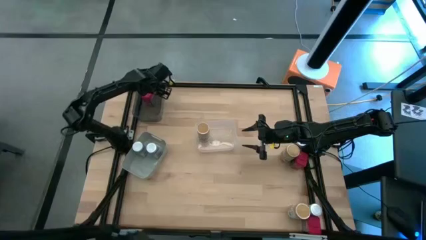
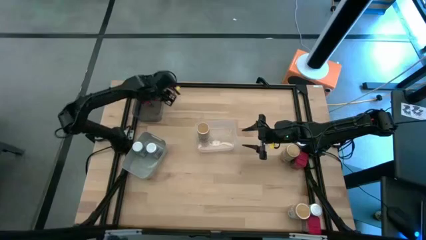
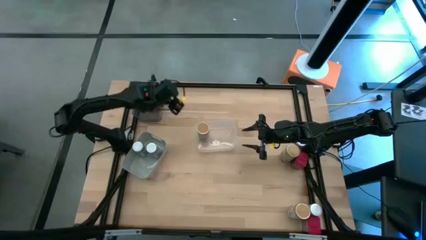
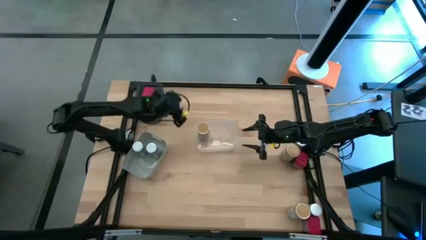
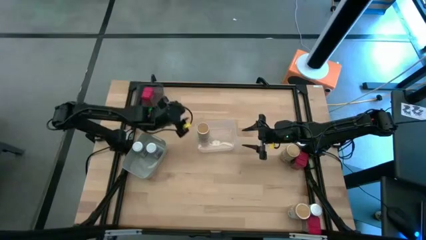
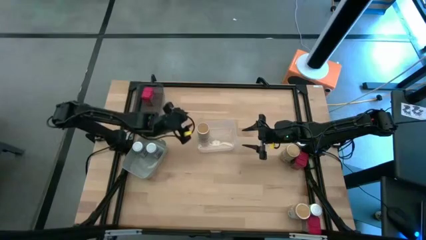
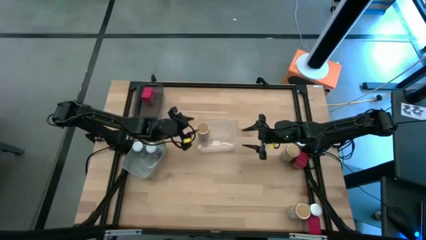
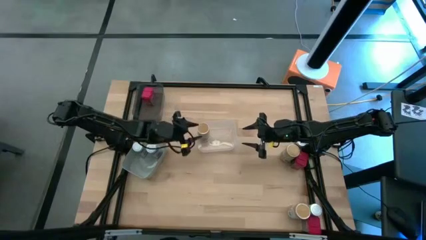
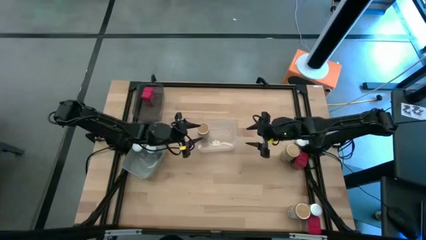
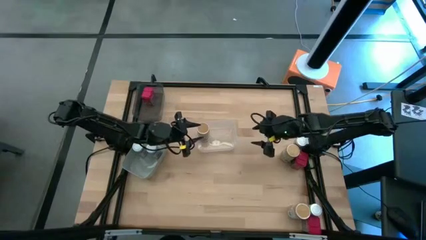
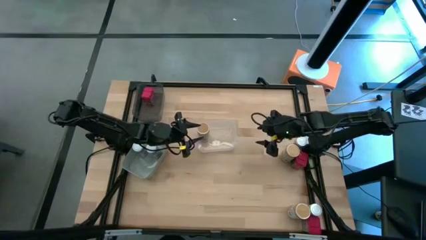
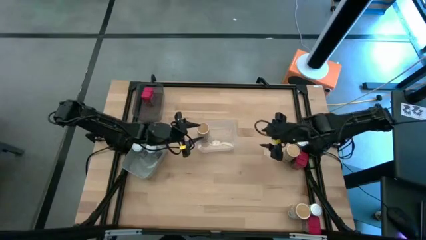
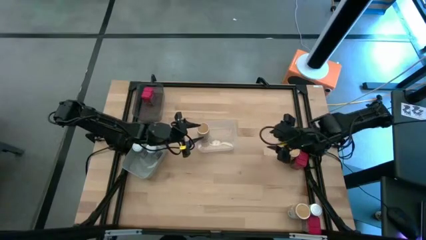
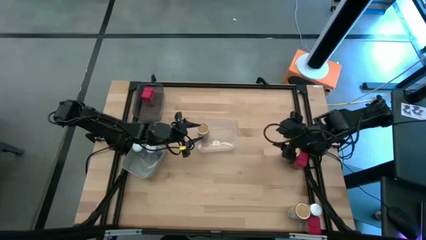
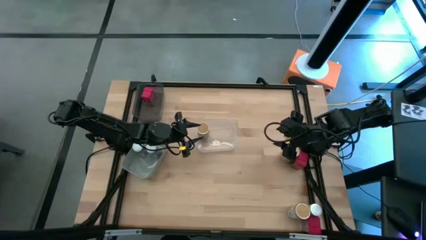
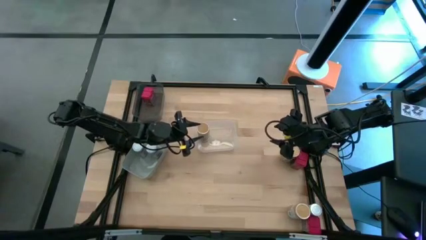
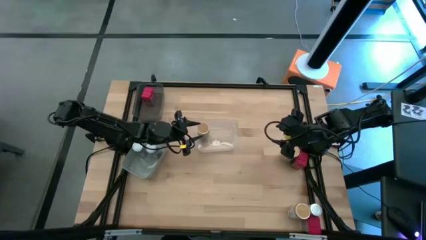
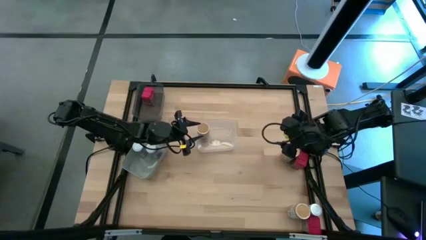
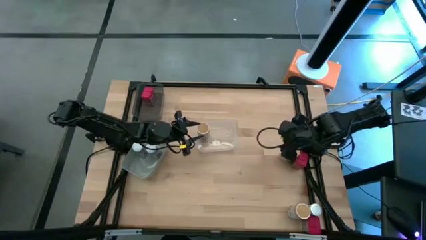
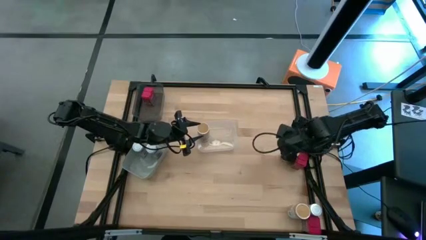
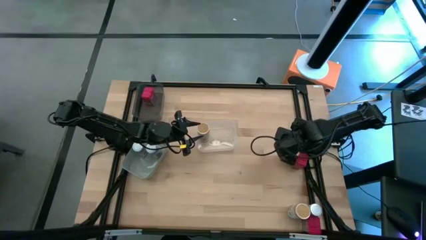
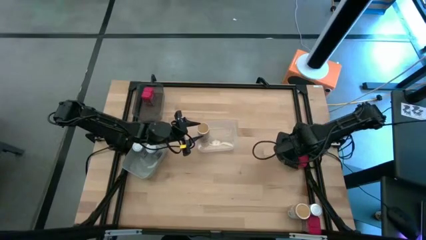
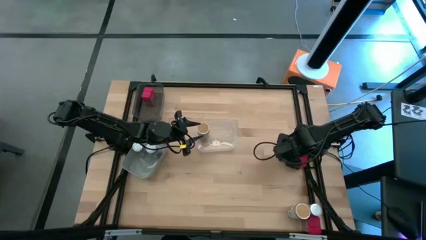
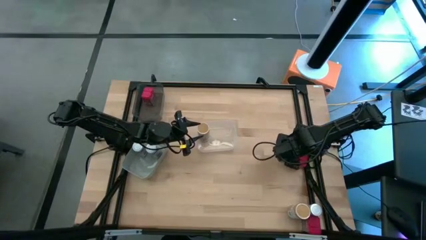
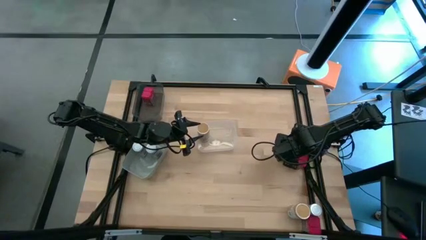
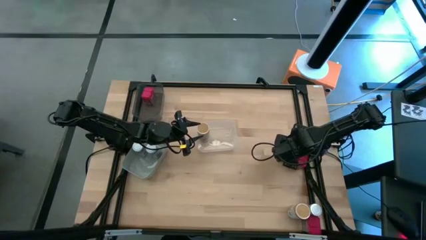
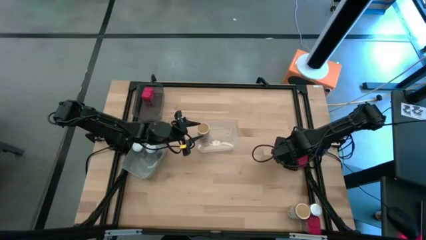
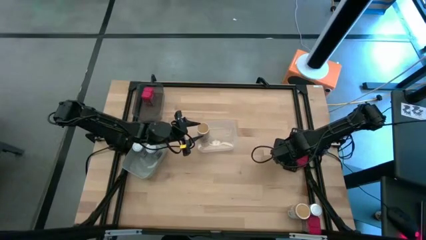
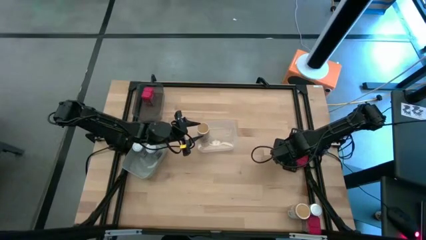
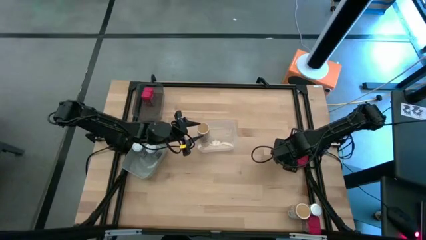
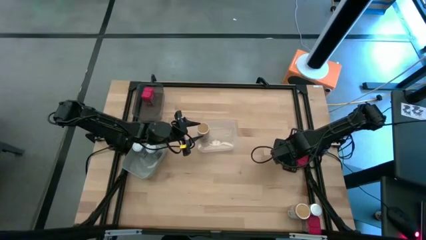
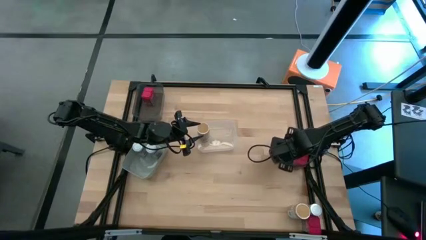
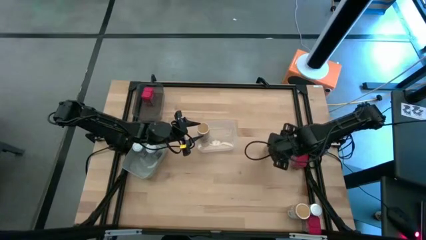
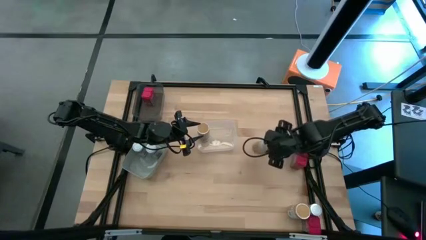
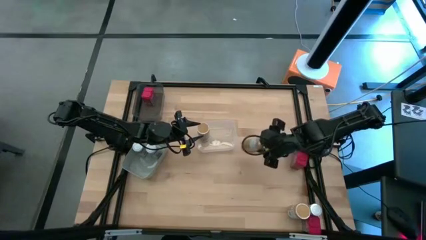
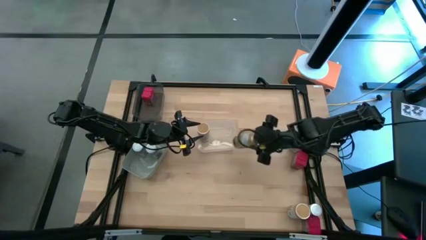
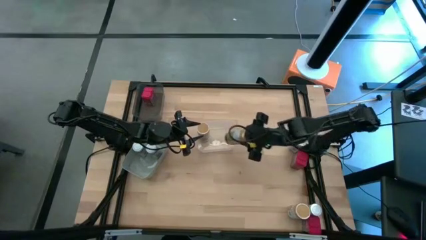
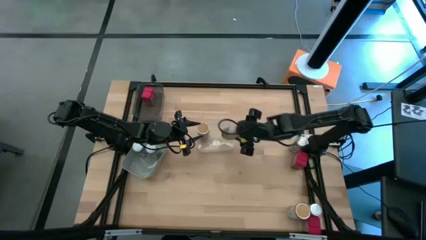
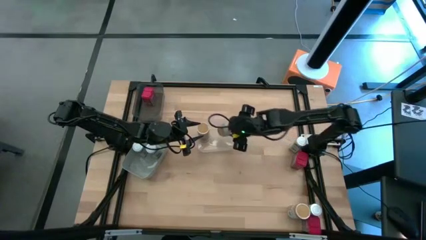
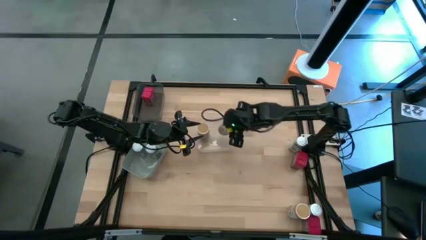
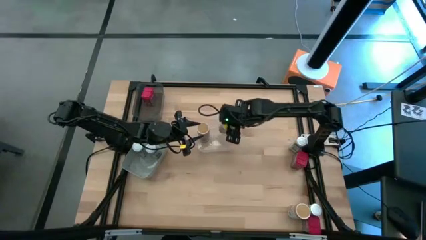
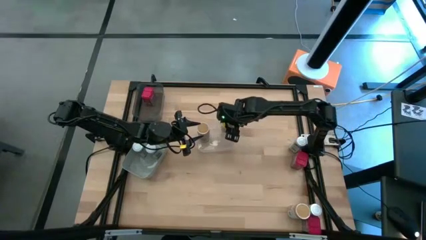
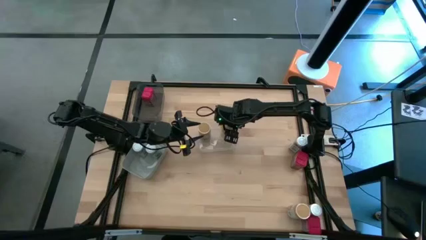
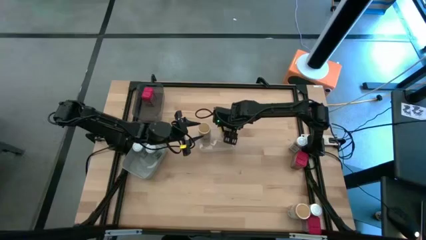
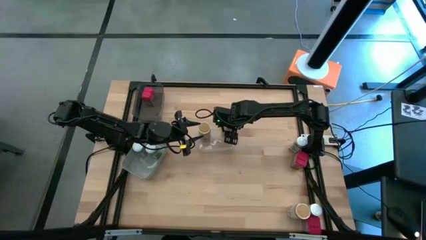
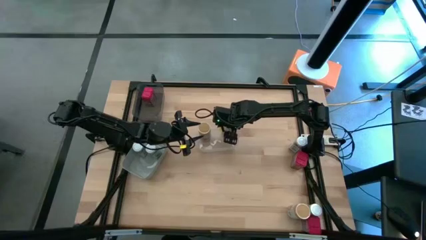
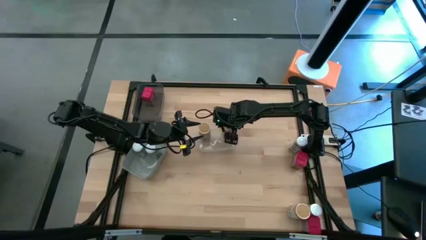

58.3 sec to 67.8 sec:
Task: Sort spices by type
Put the top brown seasoning bottle into the transparent bin

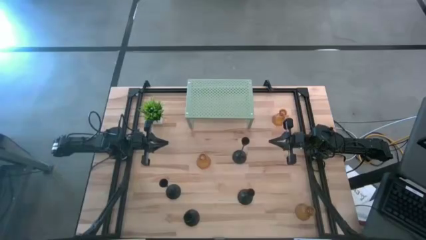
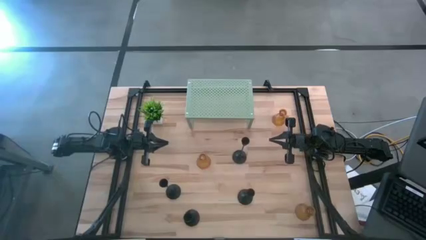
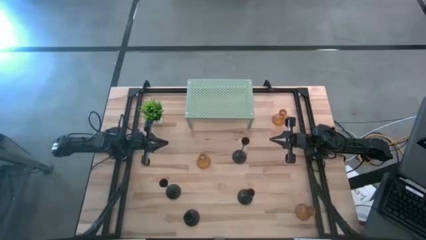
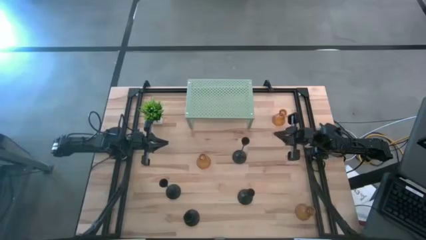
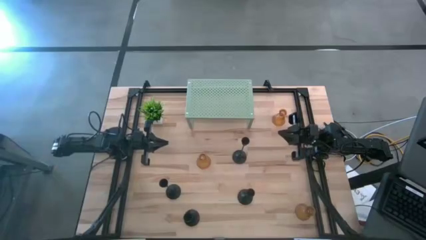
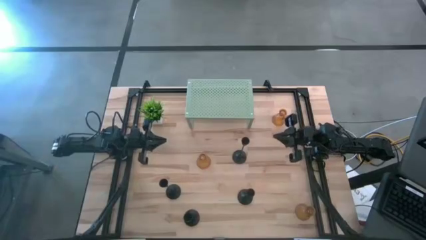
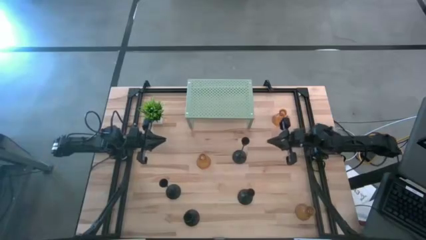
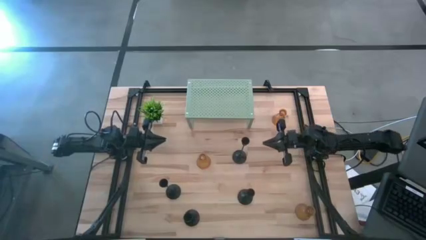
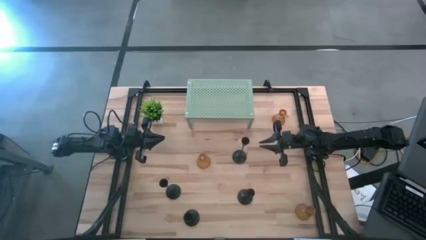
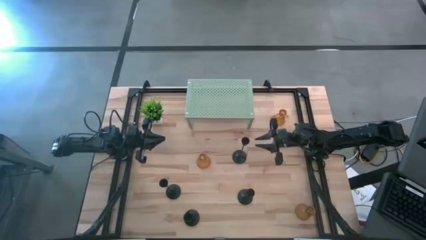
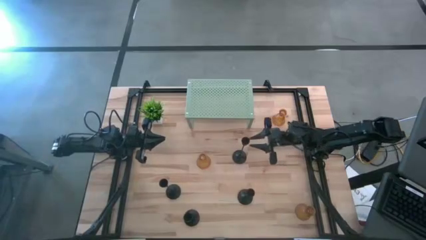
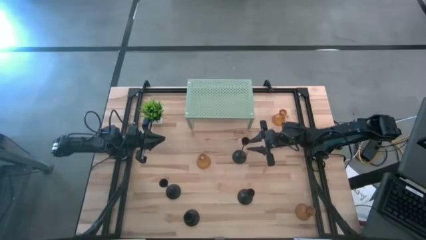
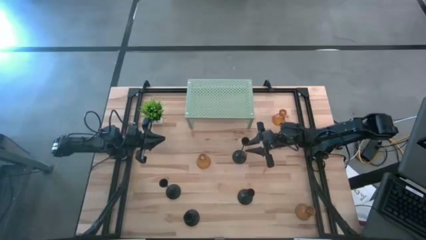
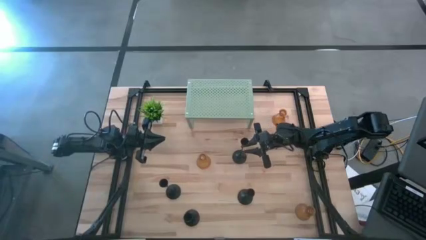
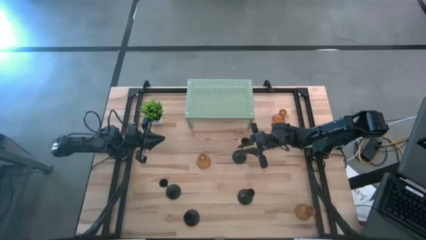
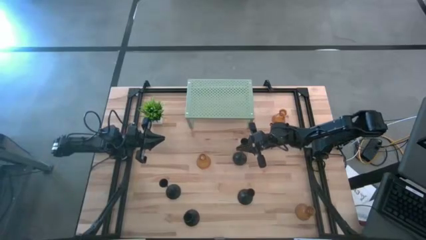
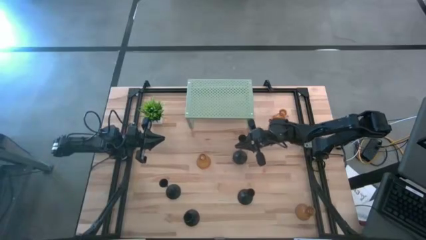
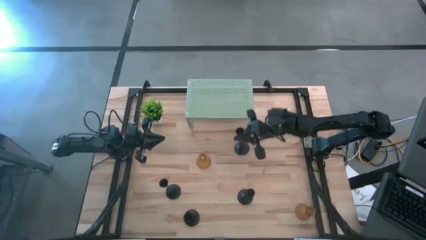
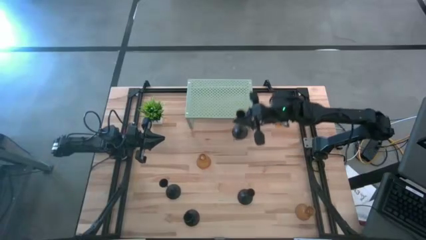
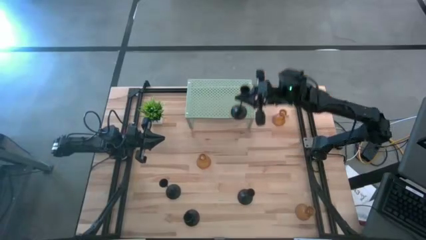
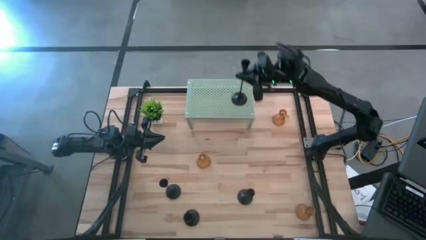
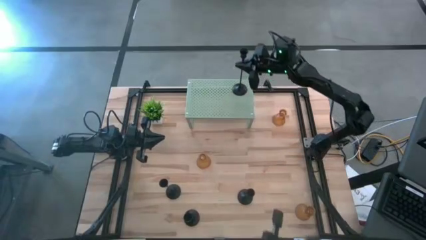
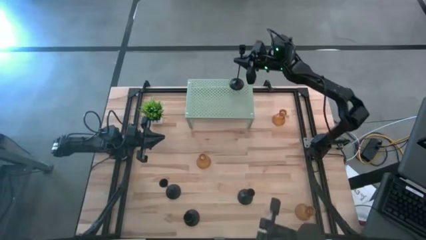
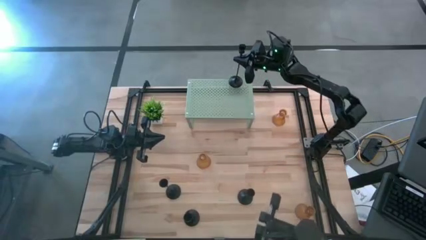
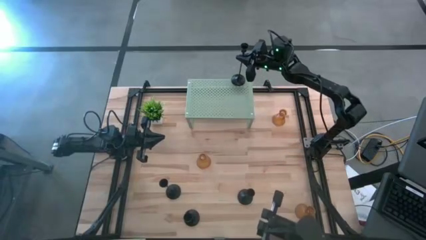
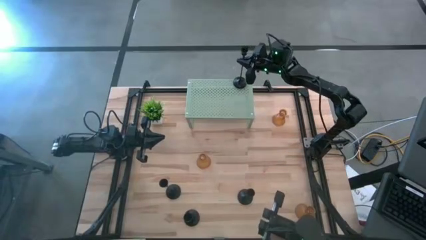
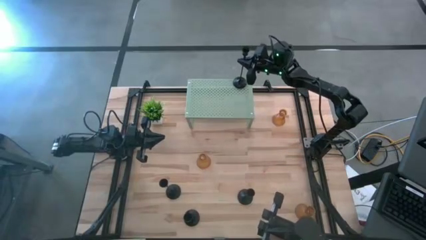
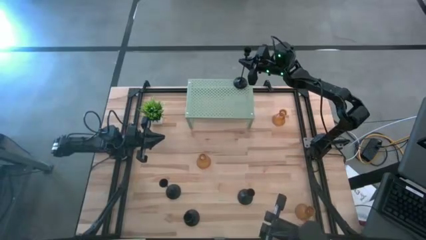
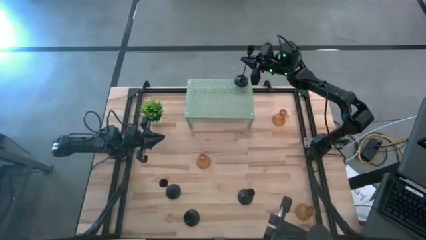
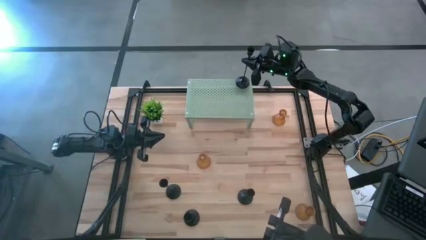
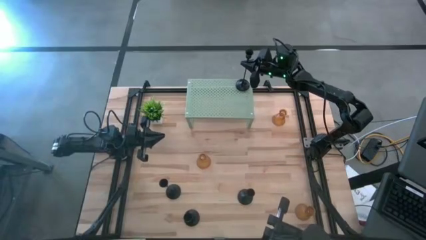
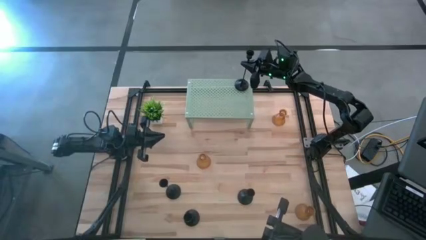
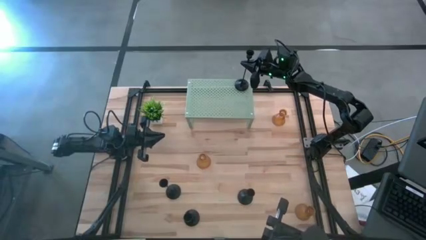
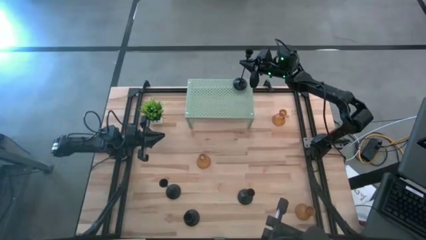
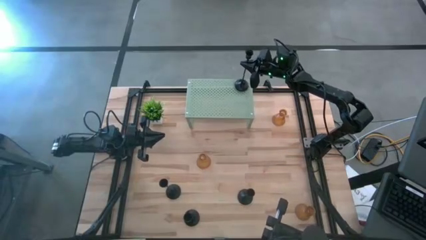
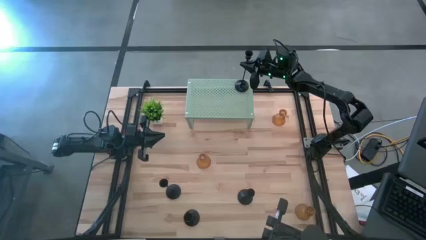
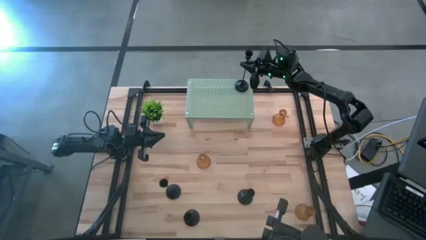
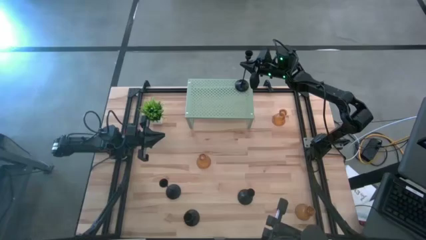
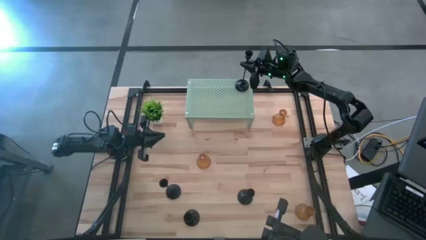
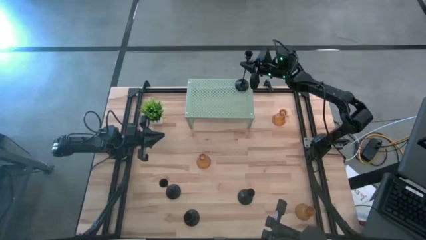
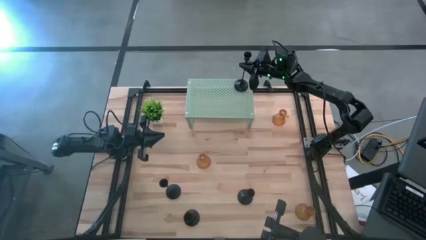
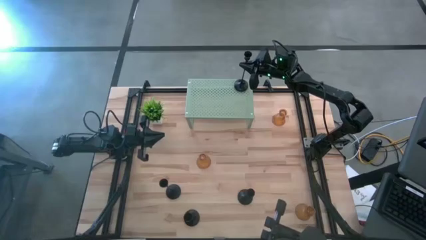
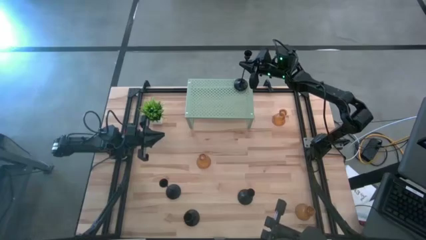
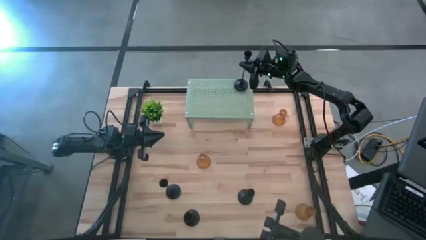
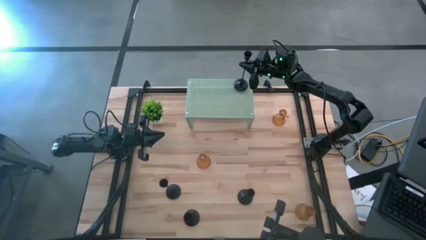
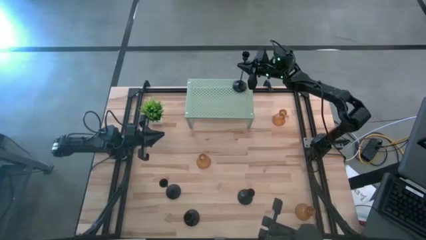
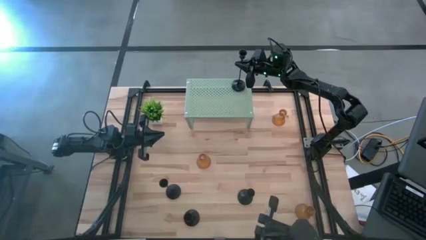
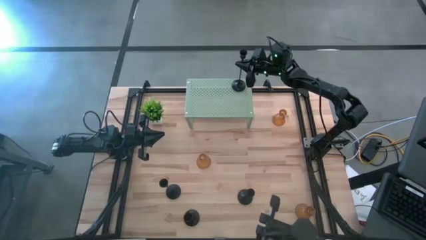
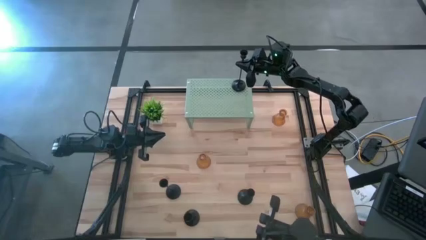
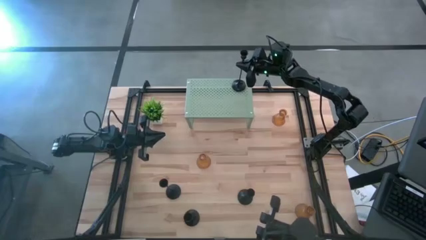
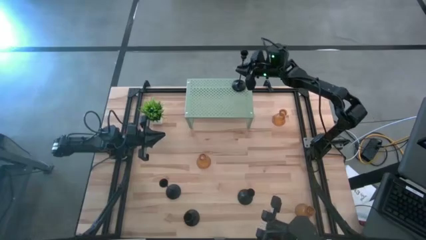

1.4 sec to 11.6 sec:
Task: Pick & Place candle stick holders
Put the black candle holder on the top right of the shelf
